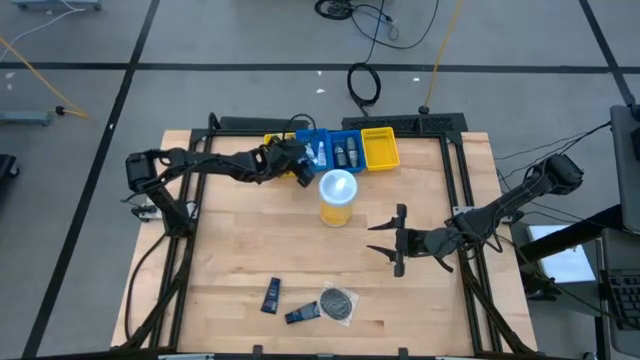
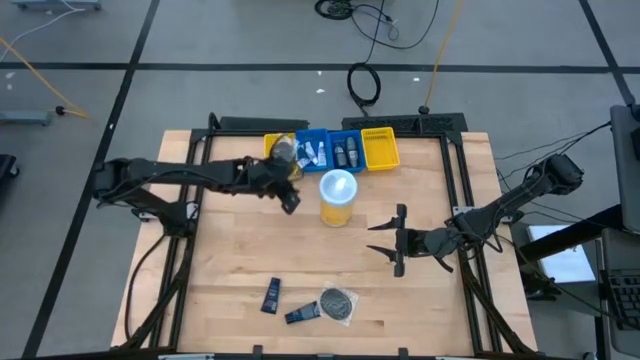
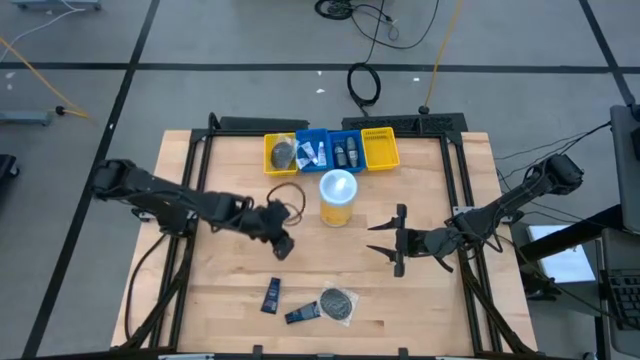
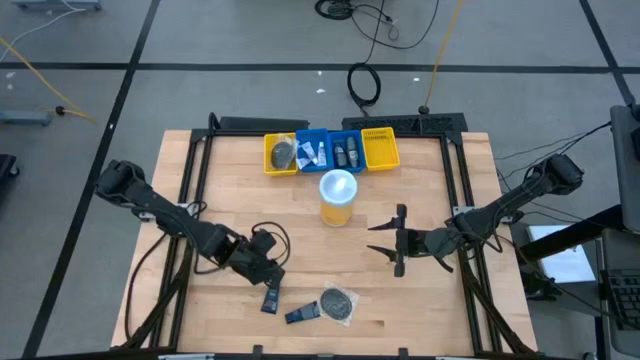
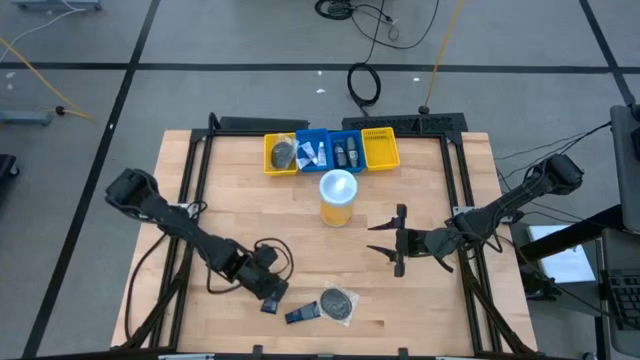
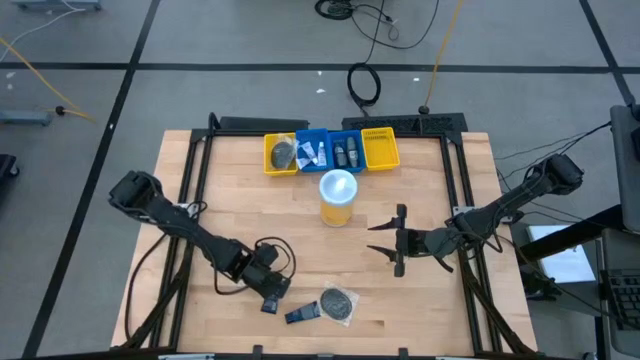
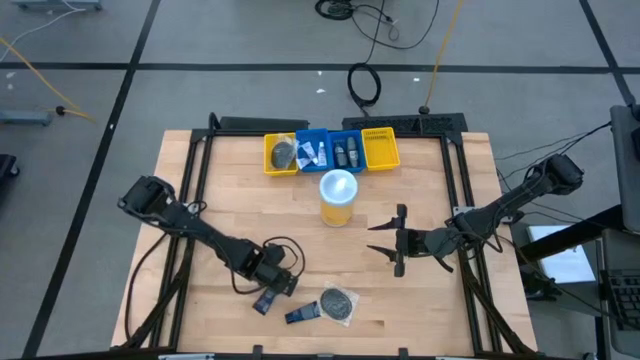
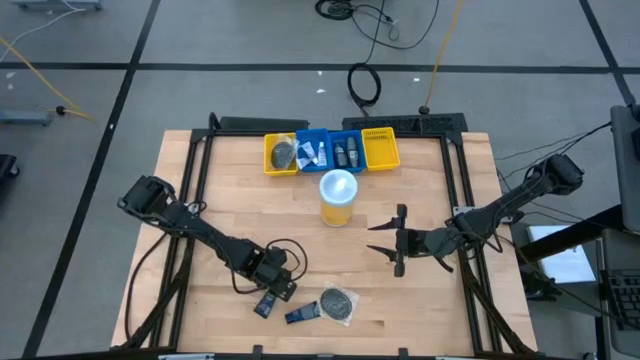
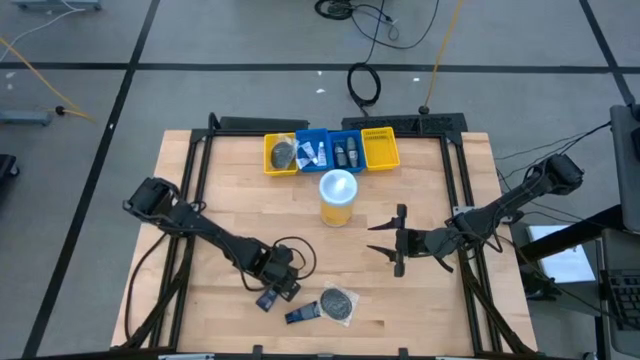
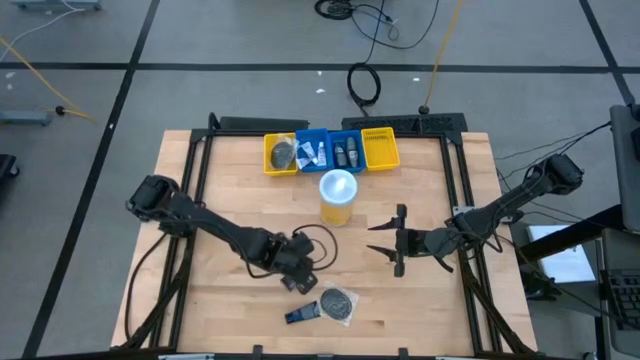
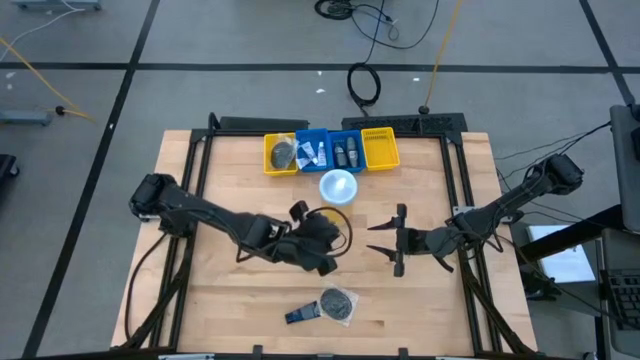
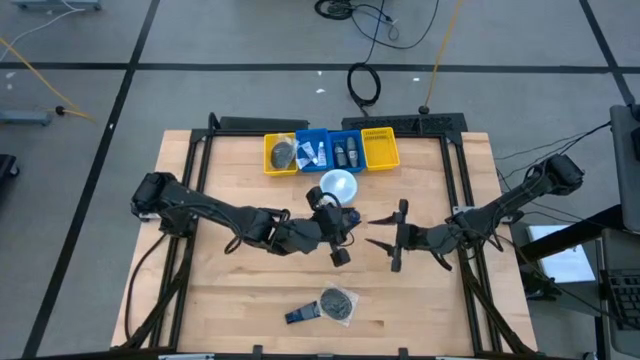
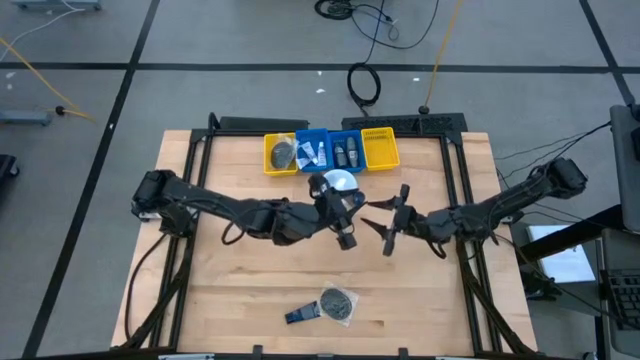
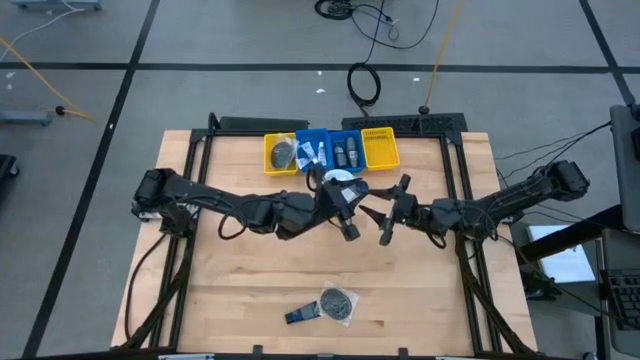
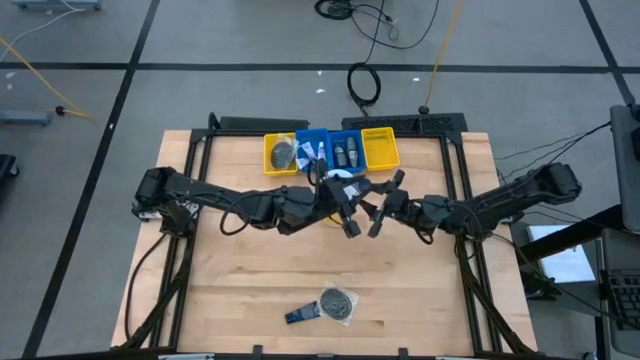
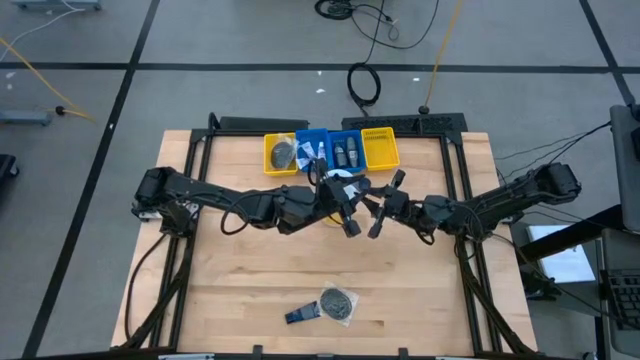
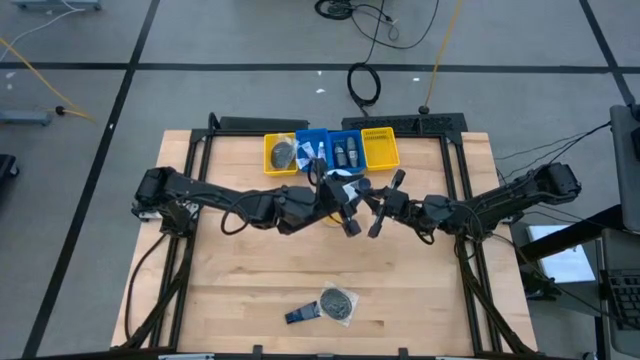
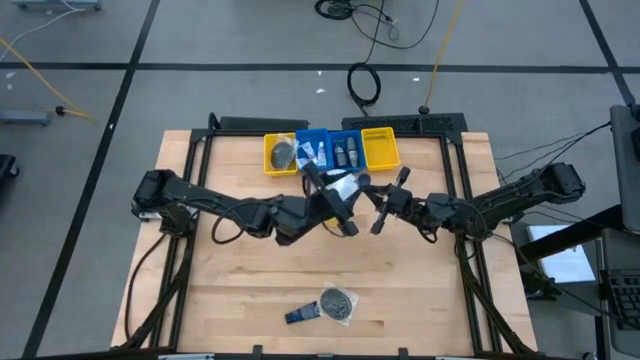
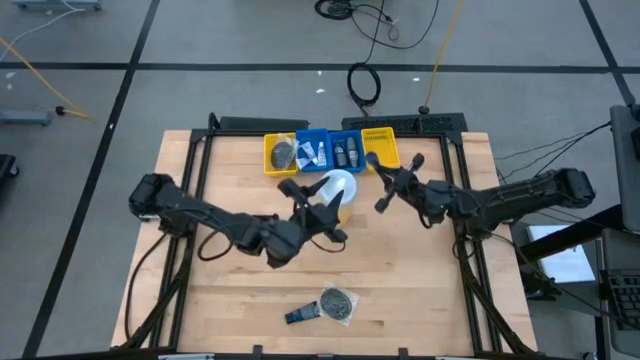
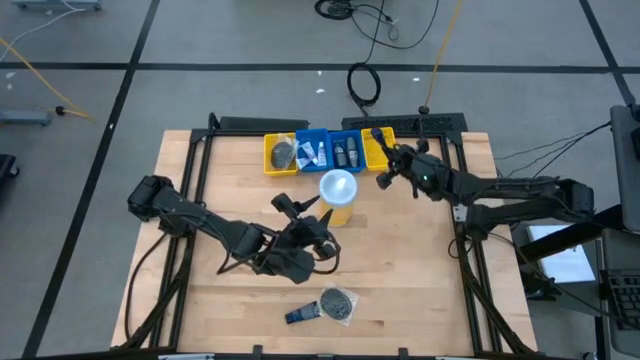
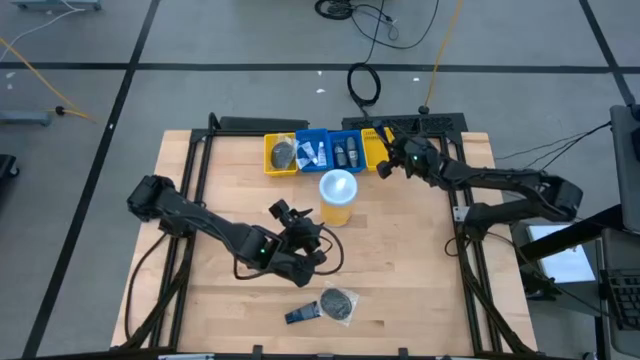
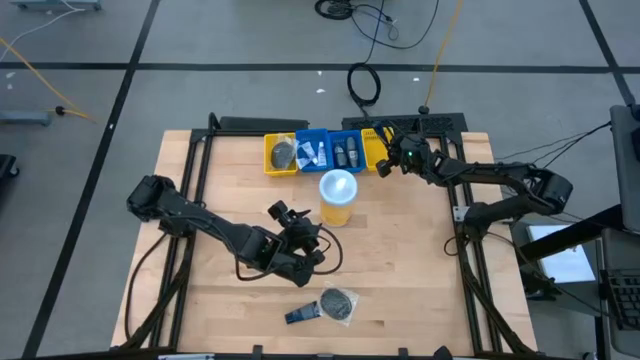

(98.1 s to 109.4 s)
Task: Pick & Place Travel size toiletries
Put the shaving cream into the right yellow basket

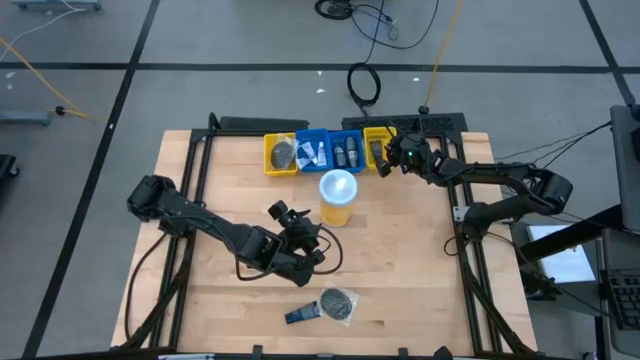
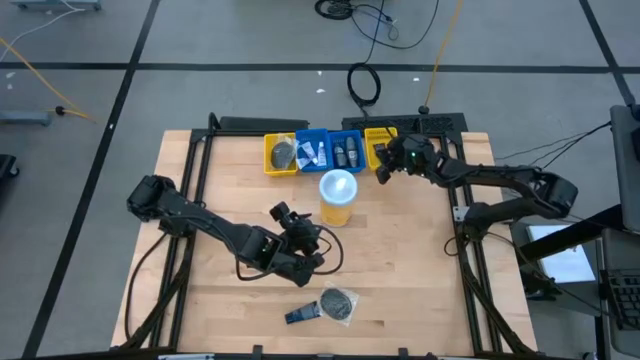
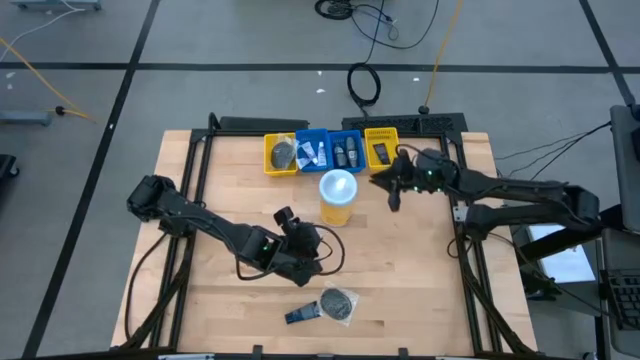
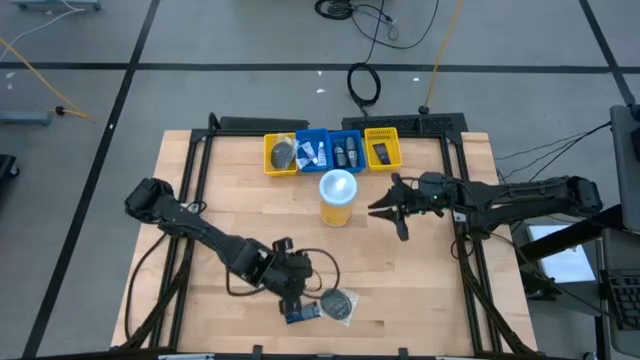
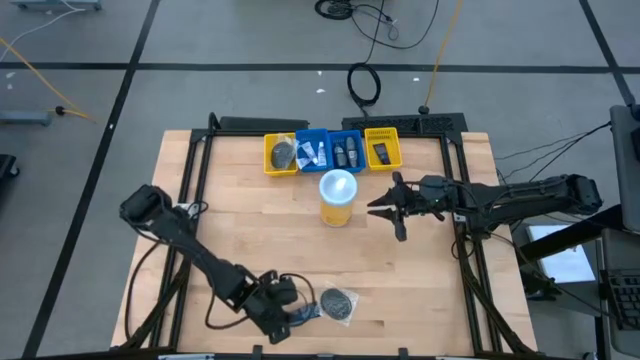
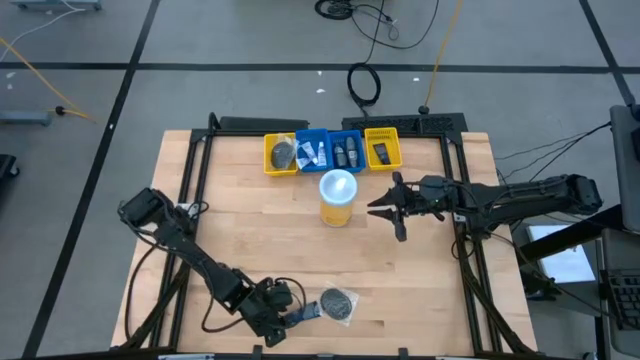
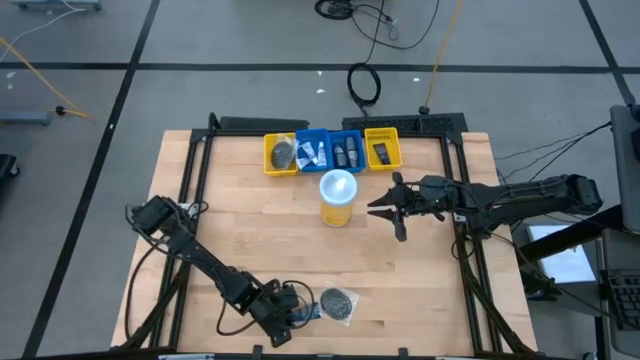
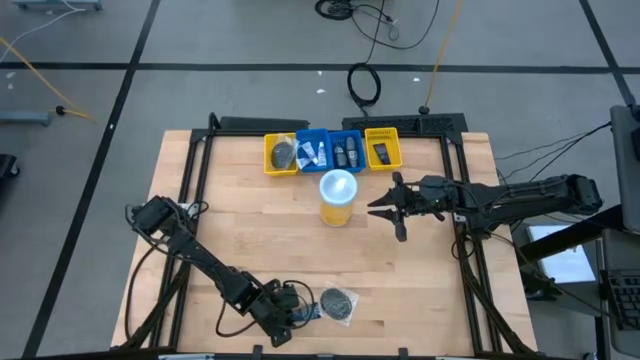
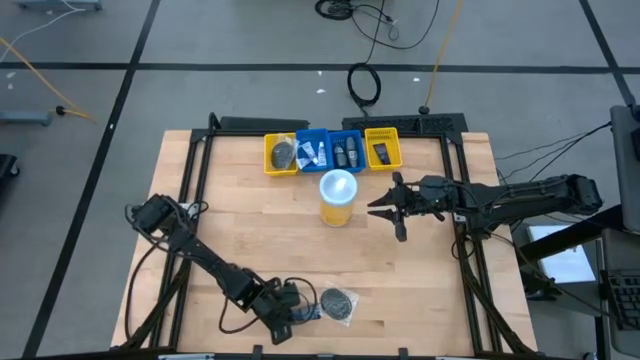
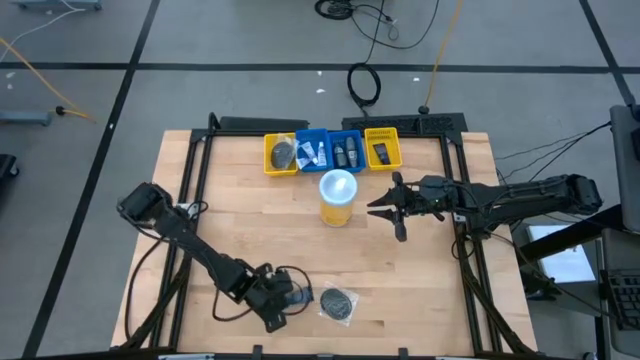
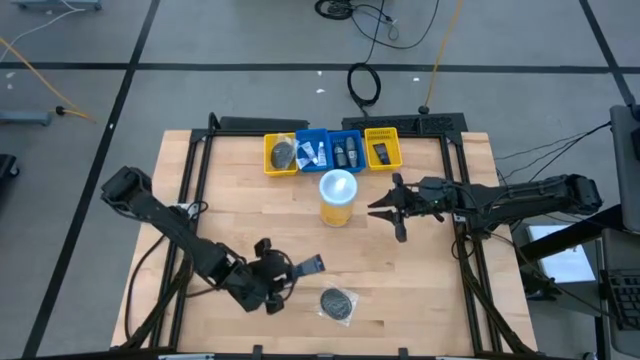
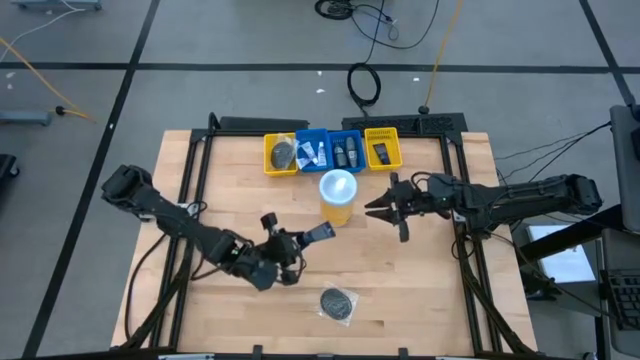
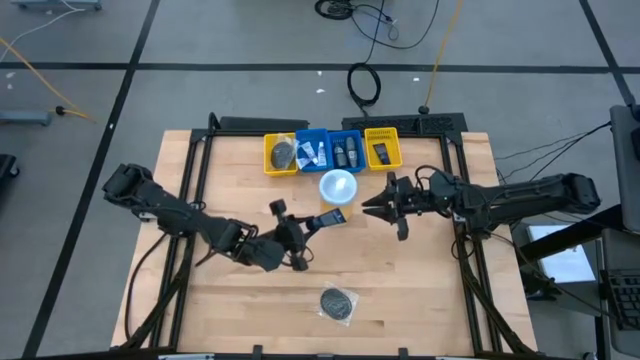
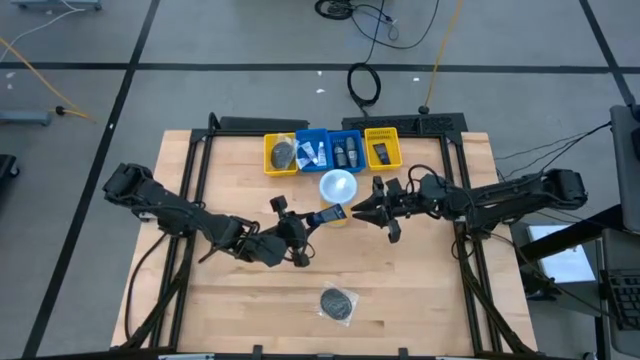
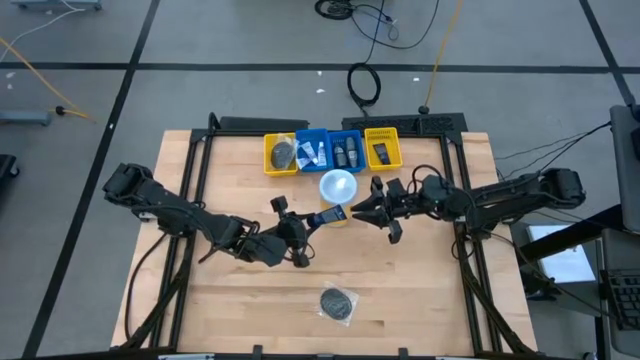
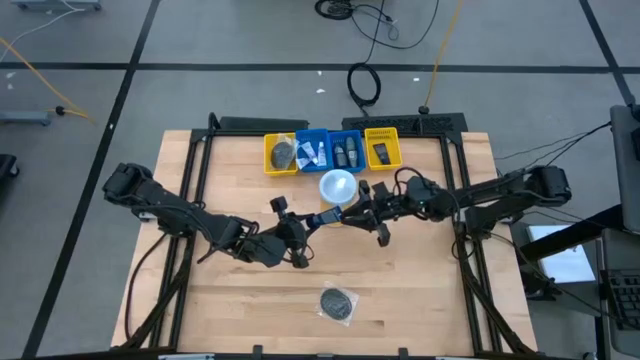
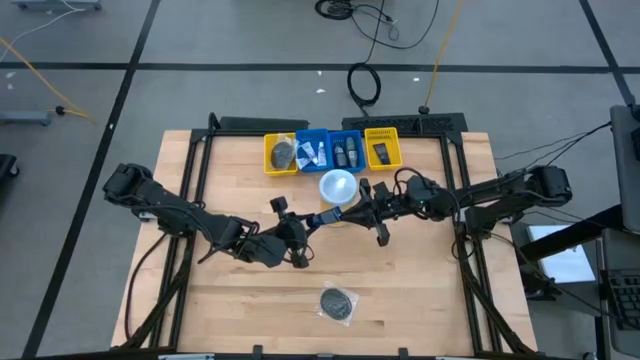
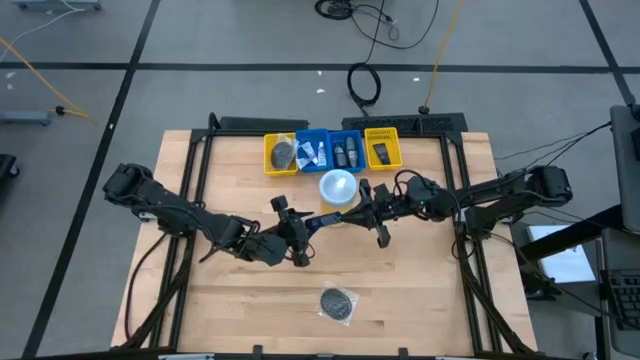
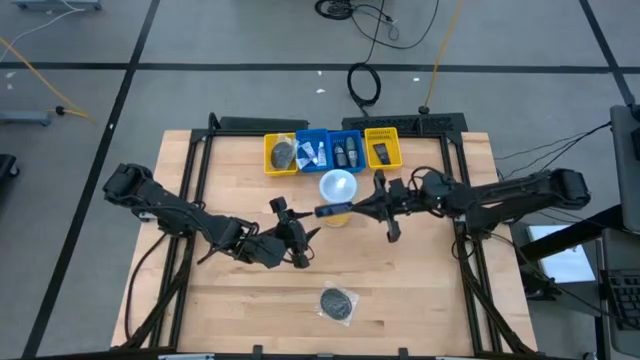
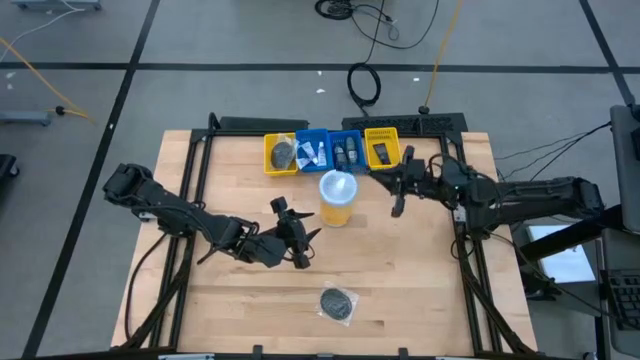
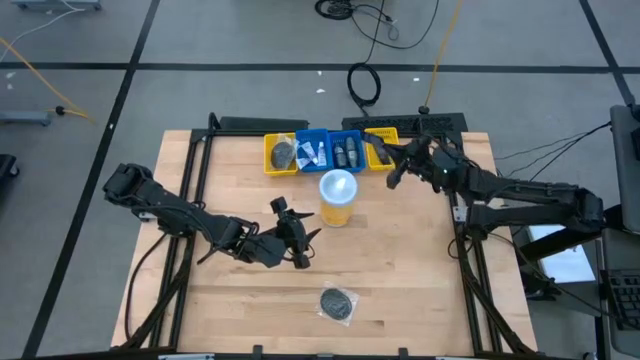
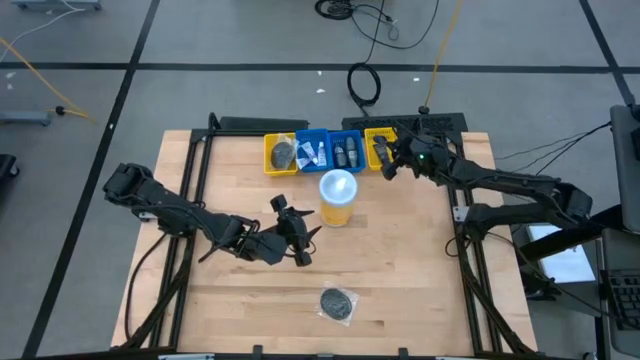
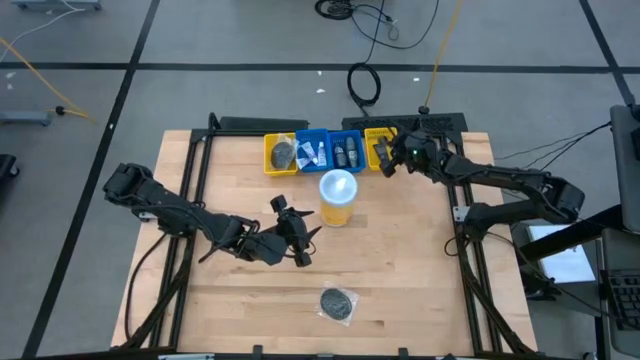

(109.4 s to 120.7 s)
Put the shaving cream into the right yellow basket

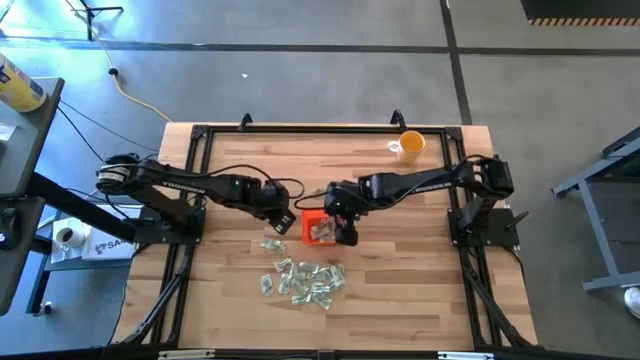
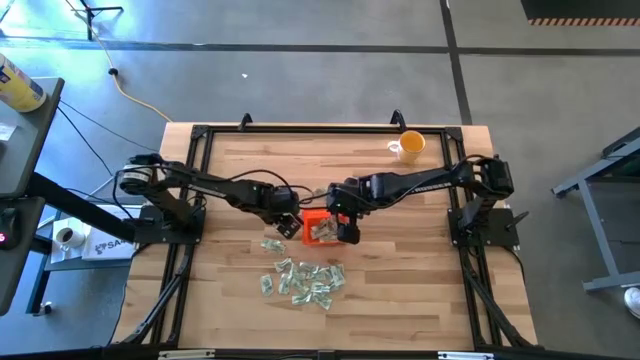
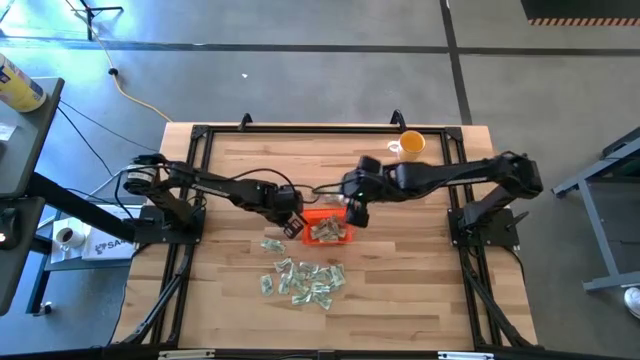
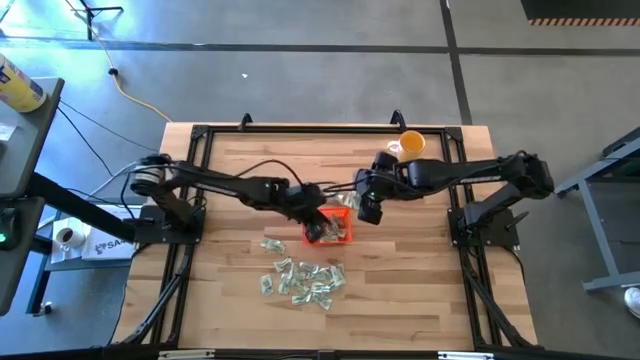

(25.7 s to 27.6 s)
Task: Pick and place Stevia / Truvia into bins
Put the stevia packet into the orange bin
